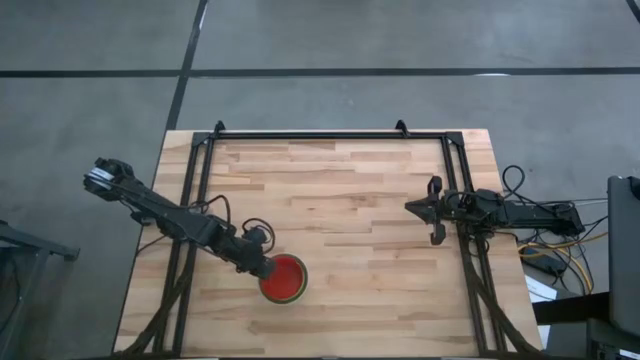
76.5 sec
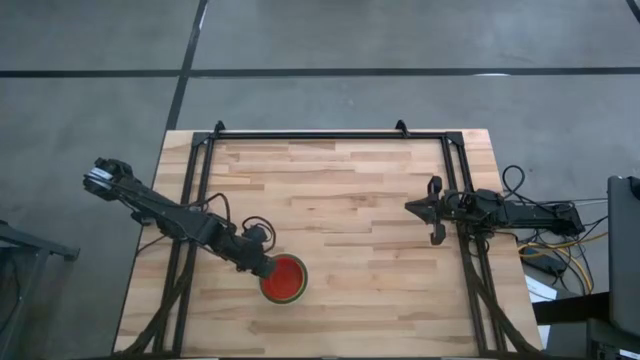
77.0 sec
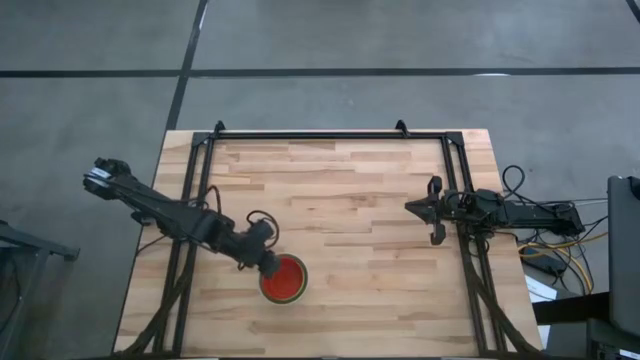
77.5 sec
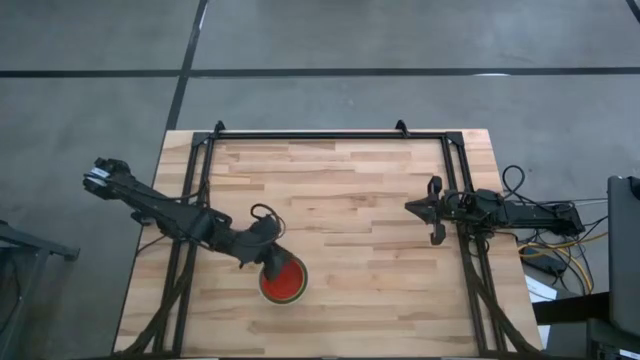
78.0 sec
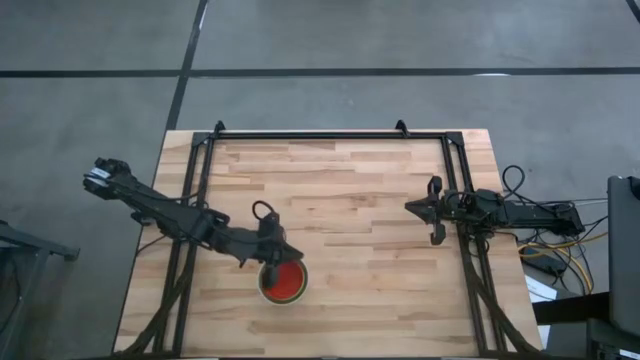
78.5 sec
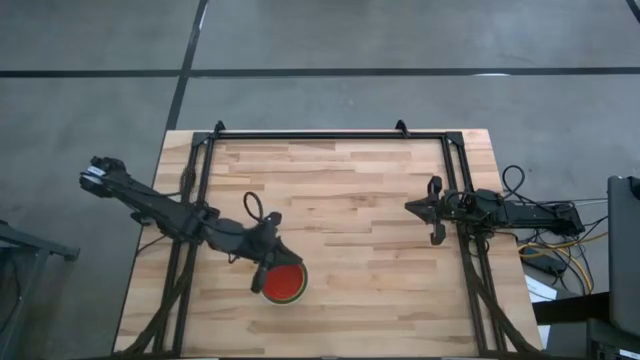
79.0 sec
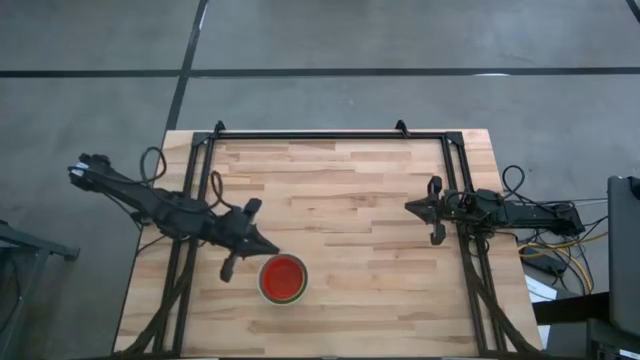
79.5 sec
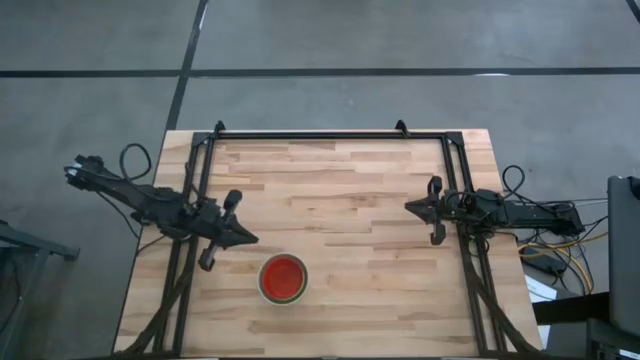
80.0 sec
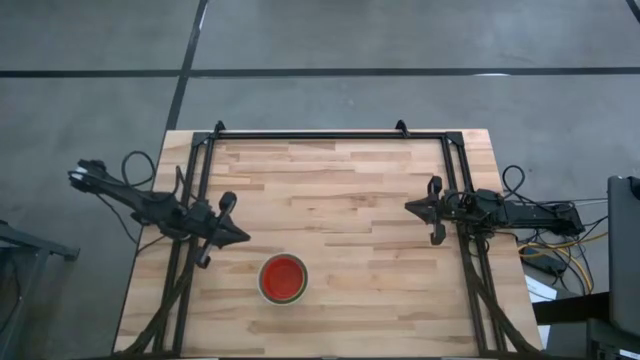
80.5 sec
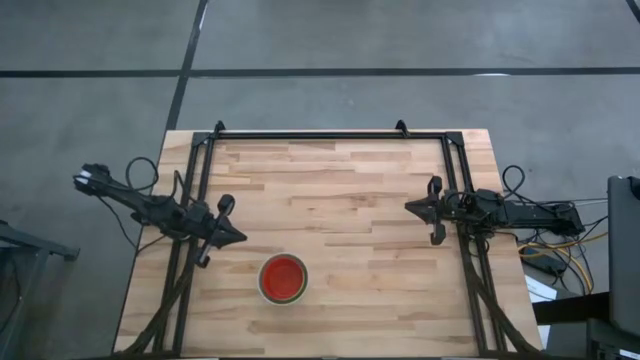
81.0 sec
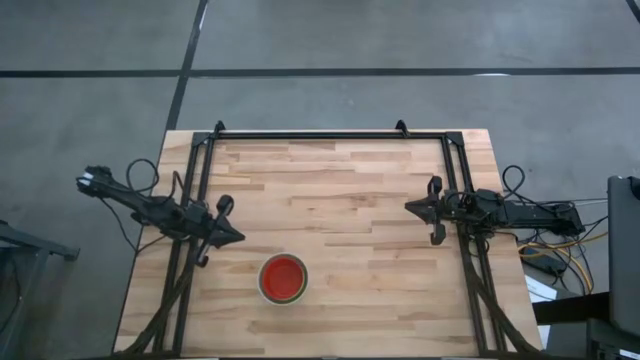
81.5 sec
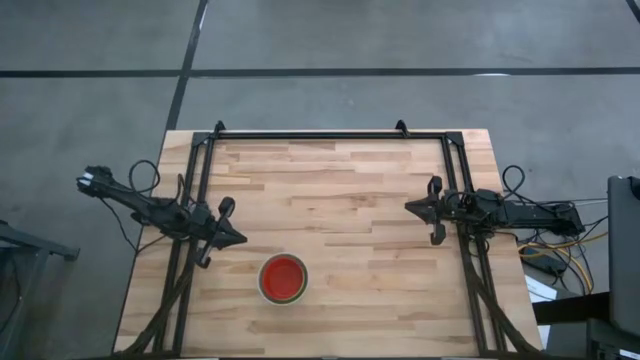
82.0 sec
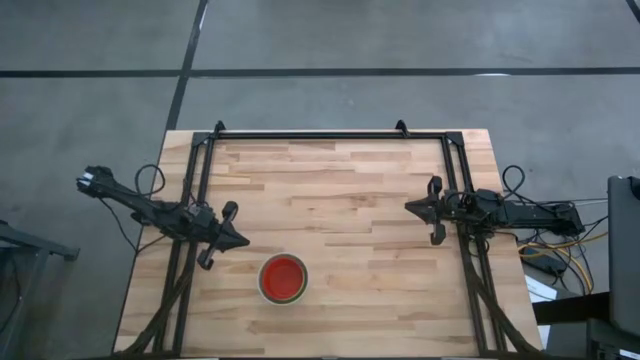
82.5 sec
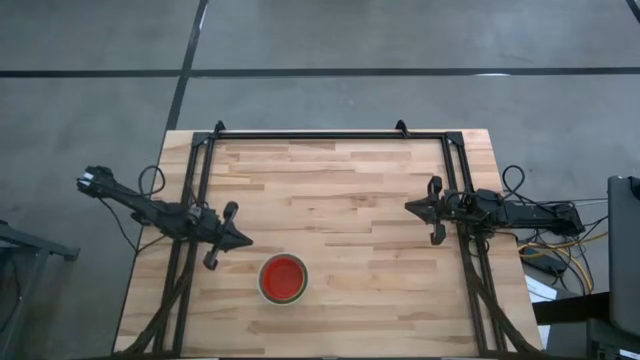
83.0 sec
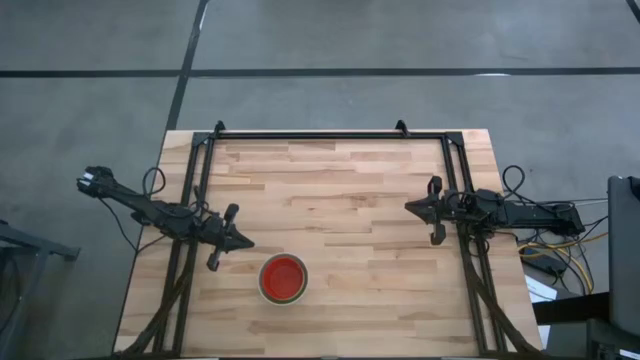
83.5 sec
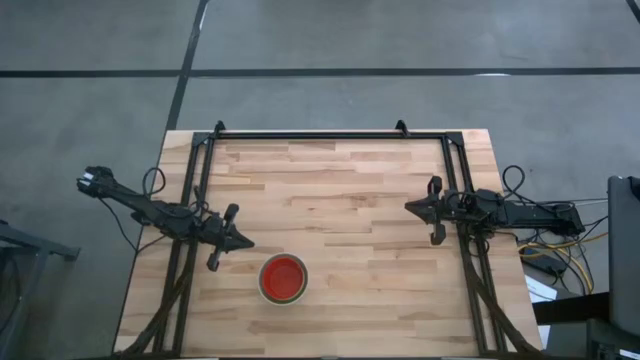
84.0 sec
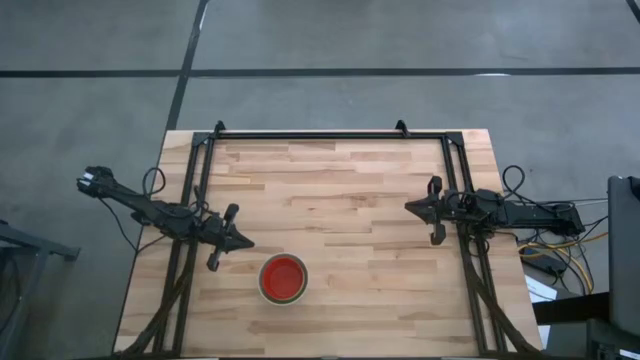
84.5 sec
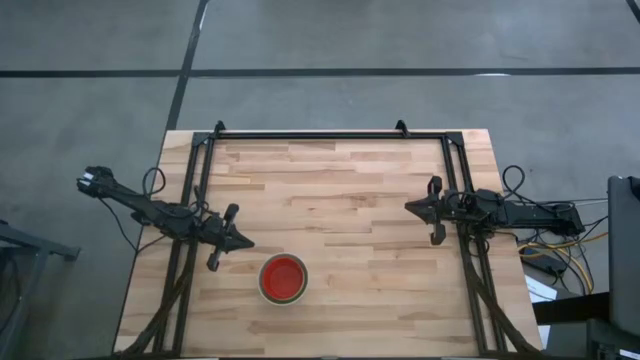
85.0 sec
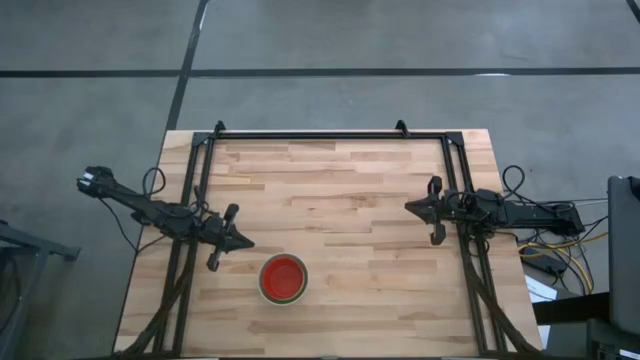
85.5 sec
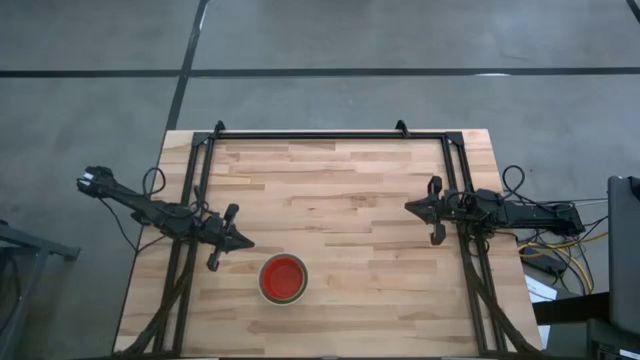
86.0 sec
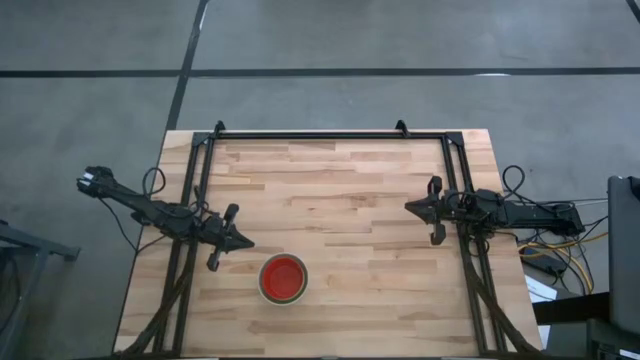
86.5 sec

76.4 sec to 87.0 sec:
Return to Home Position

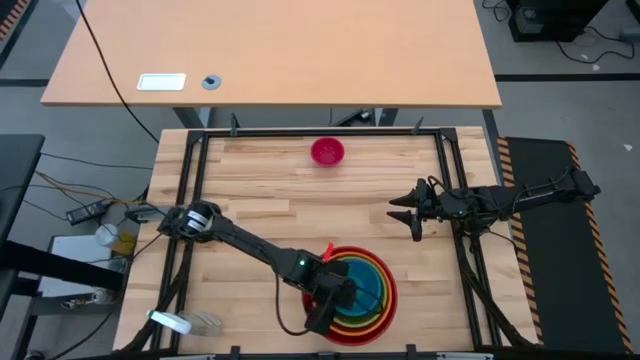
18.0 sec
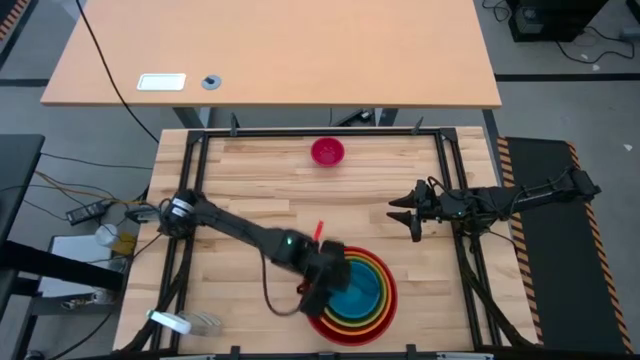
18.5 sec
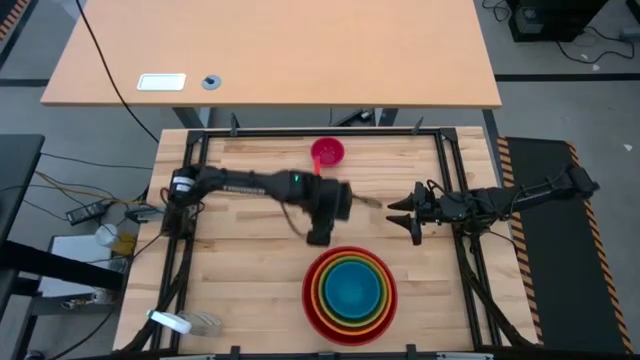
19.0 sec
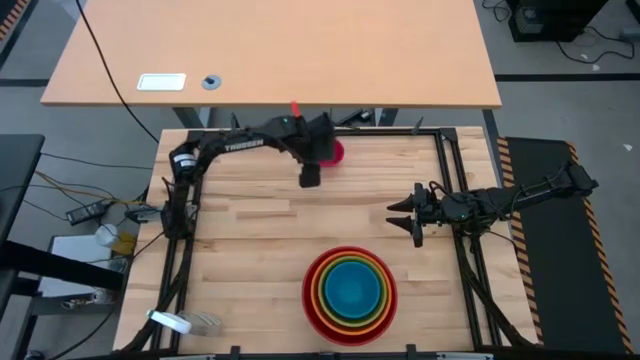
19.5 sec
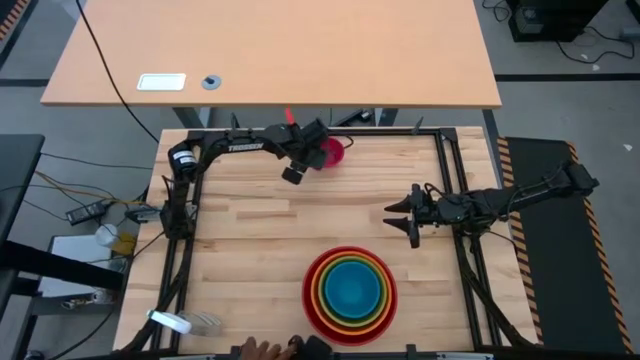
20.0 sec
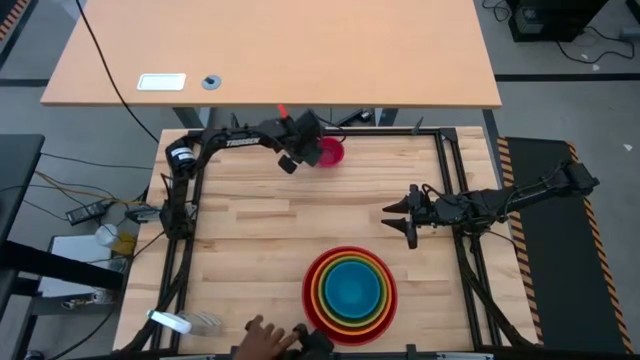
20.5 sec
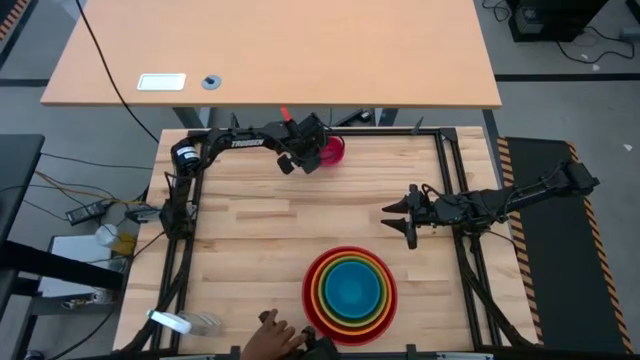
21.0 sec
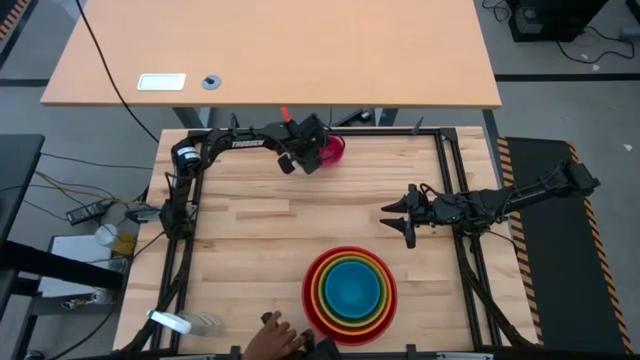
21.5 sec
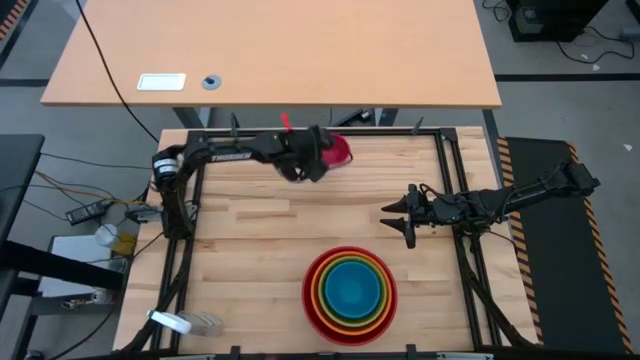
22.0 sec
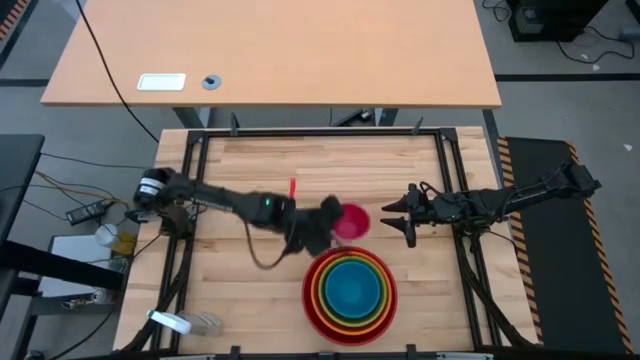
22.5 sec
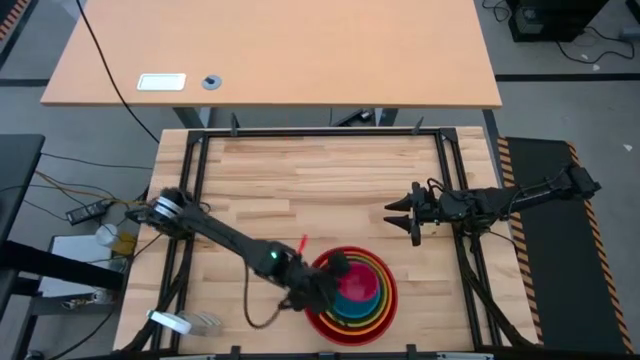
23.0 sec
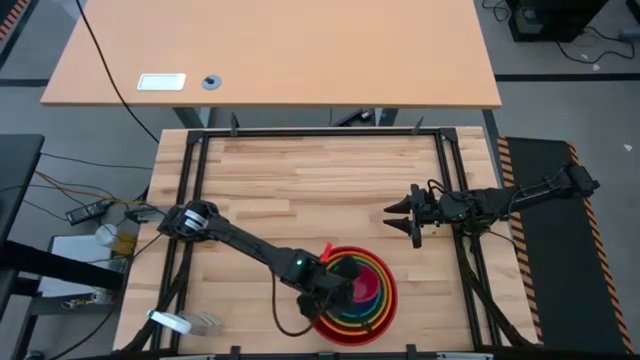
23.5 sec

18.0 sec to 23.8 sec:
Stack the pink bowl on top of the blue bowl

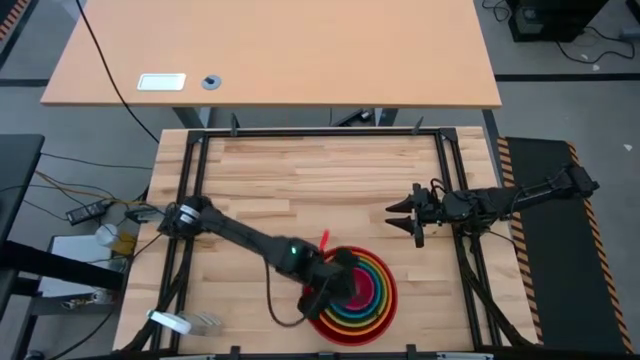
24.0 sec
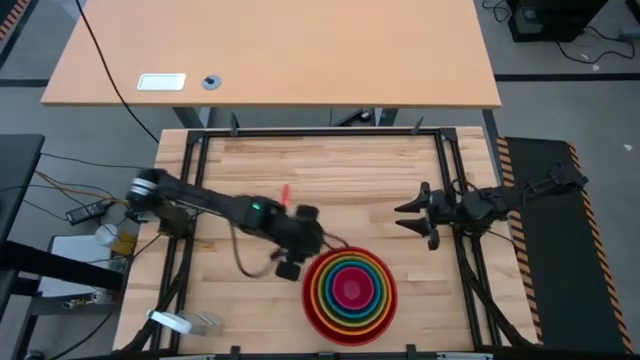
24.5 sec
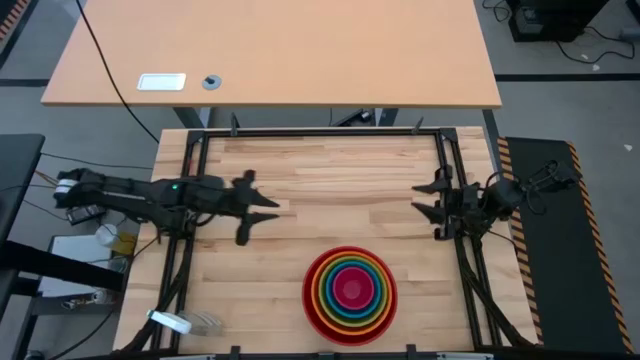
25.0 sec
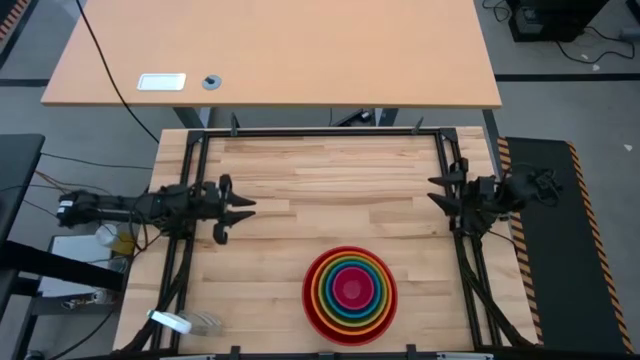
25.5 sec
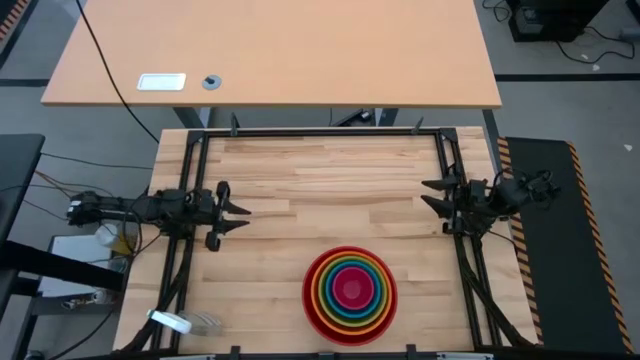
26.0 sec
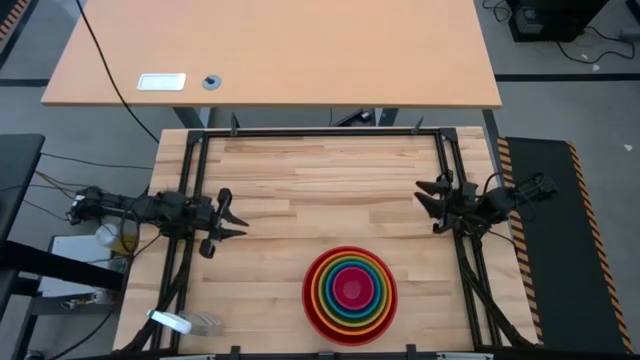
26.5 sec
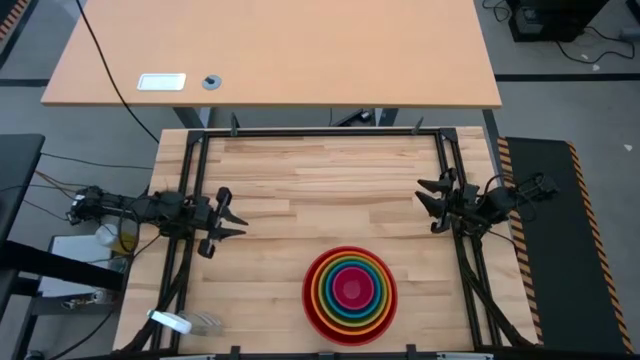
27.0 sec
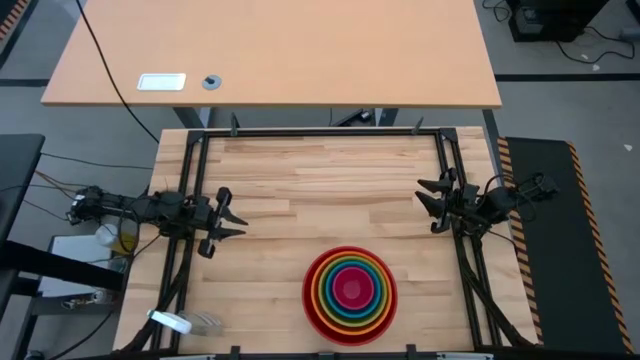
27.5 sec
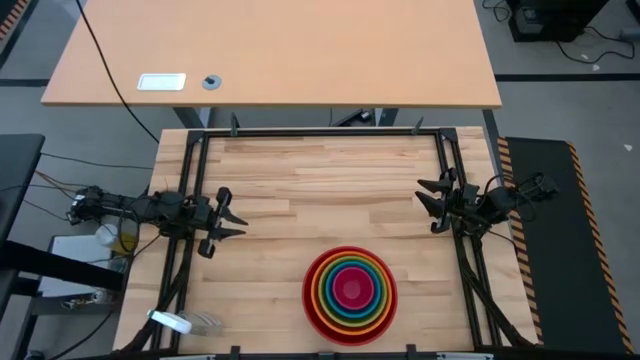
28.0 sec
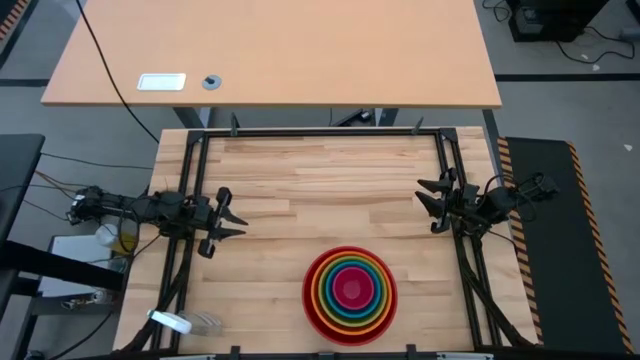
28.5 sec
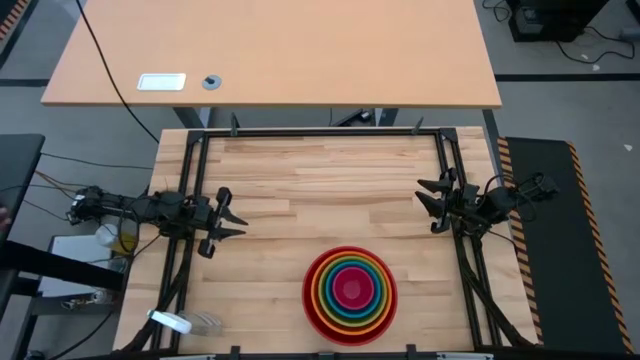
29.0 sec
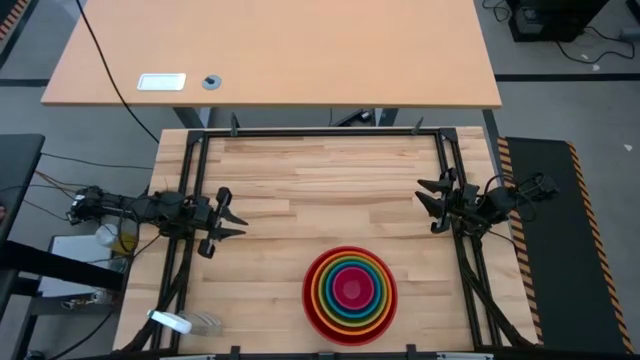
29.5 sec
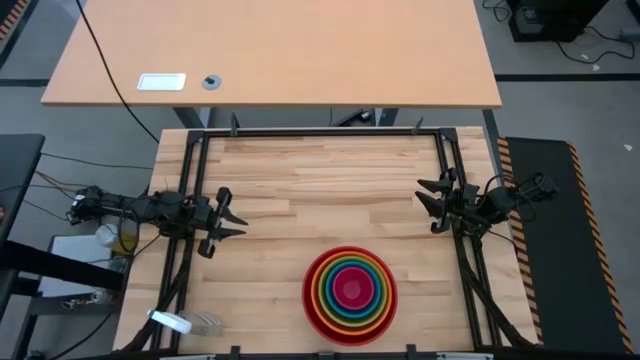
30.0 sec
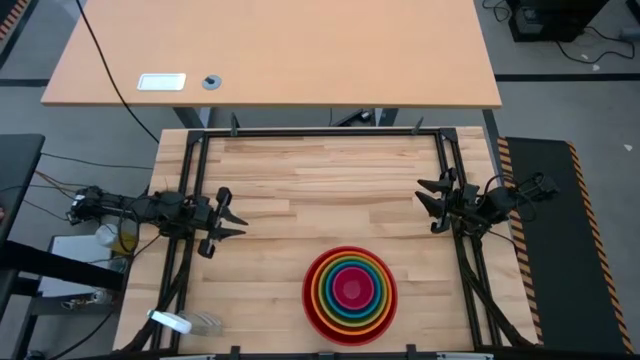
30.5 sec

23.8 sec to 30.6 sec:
Return to Home Position
